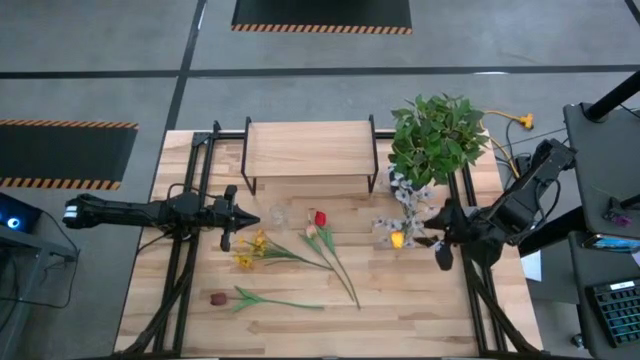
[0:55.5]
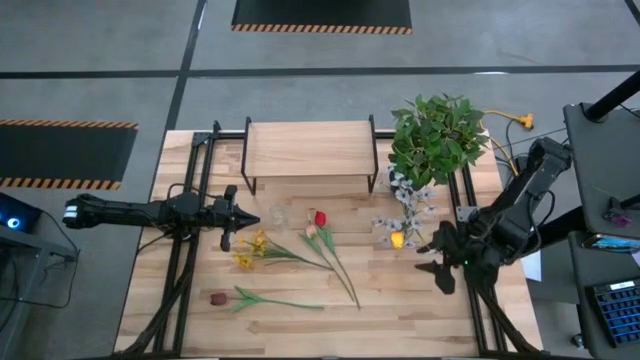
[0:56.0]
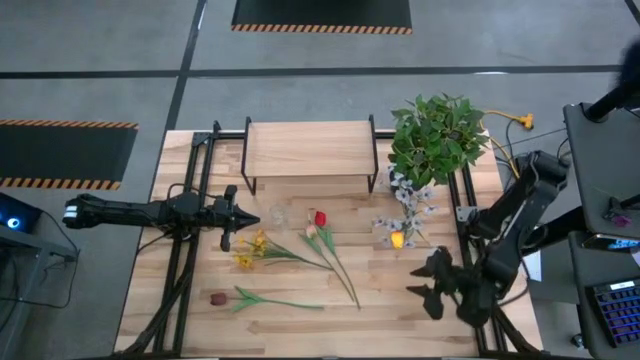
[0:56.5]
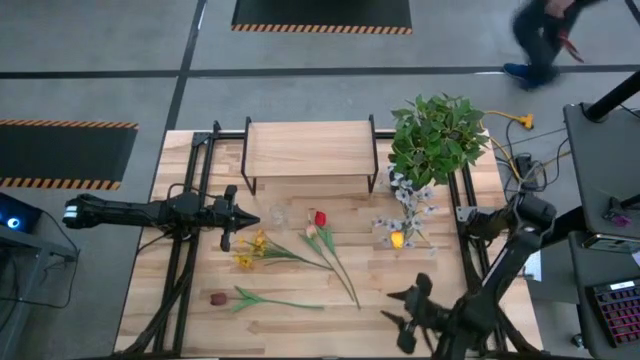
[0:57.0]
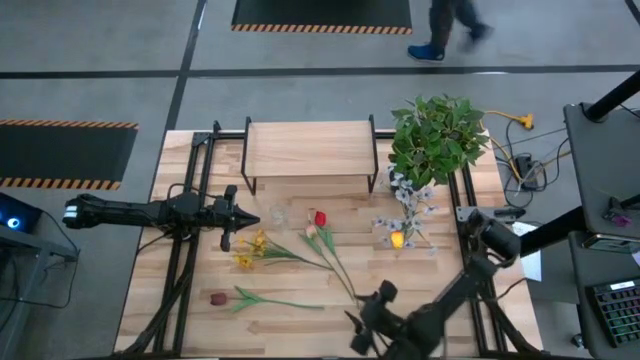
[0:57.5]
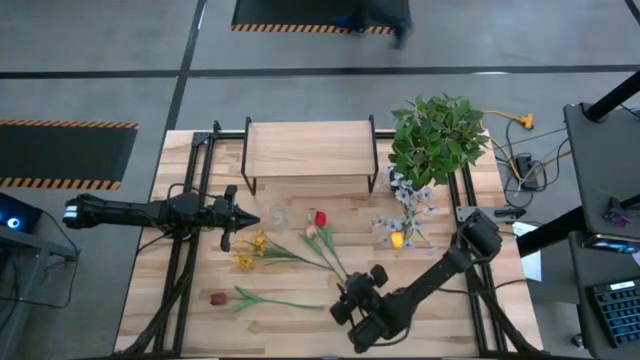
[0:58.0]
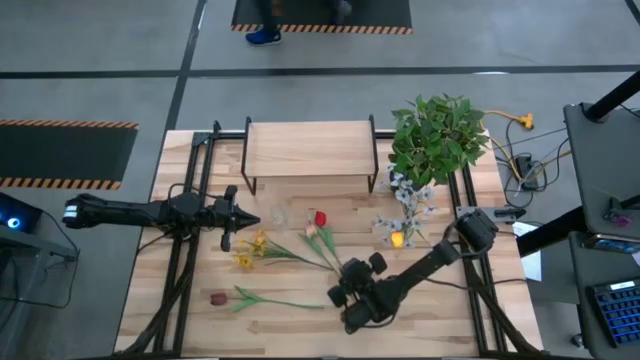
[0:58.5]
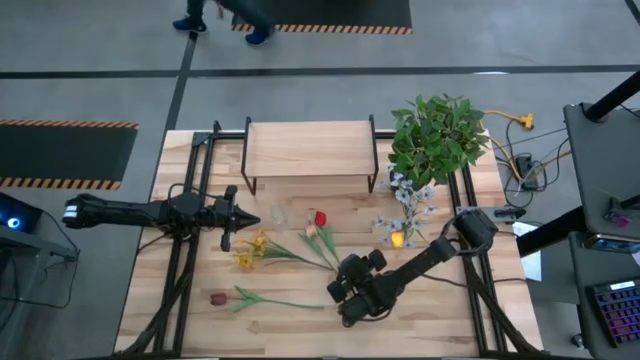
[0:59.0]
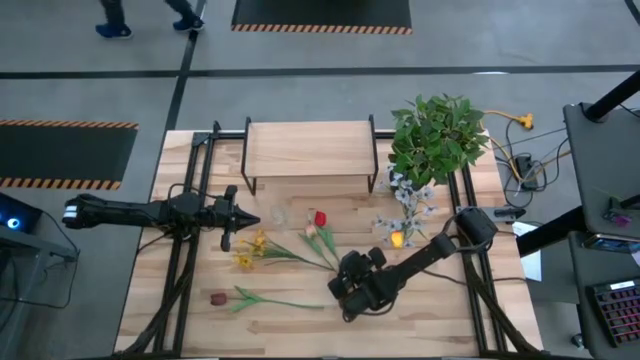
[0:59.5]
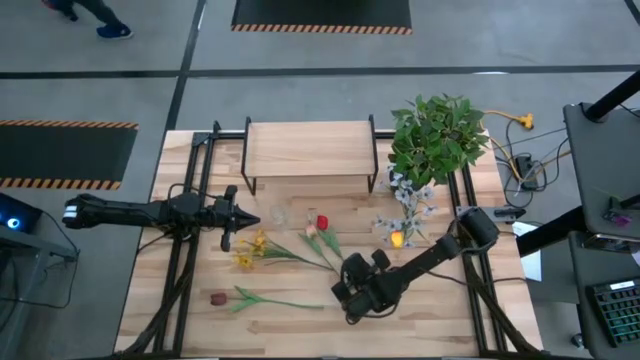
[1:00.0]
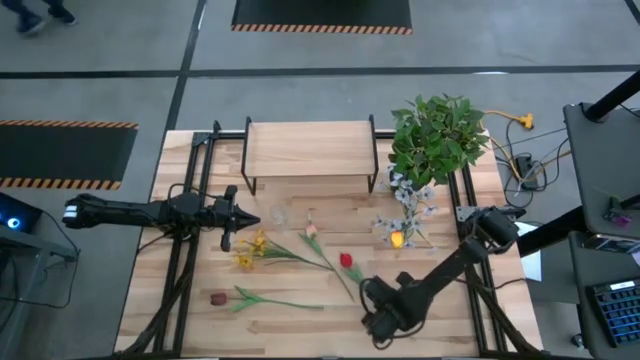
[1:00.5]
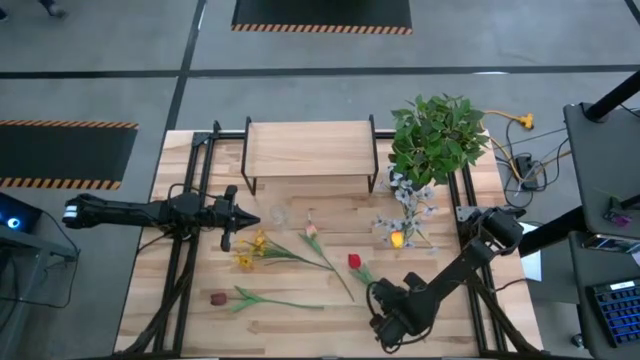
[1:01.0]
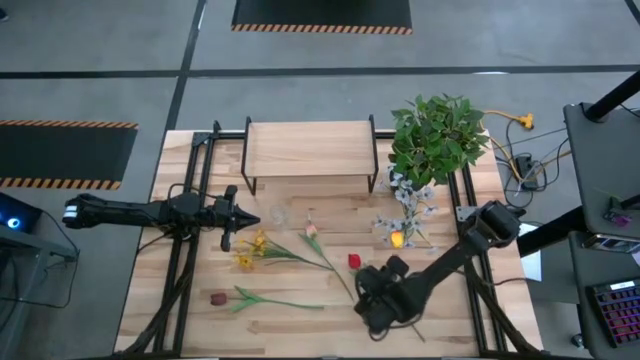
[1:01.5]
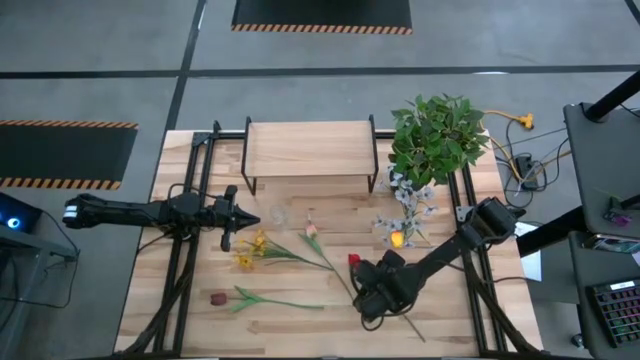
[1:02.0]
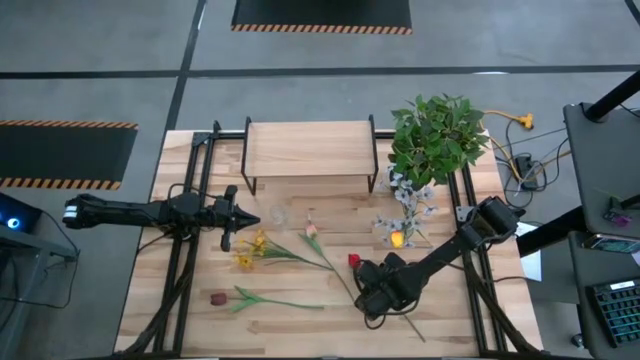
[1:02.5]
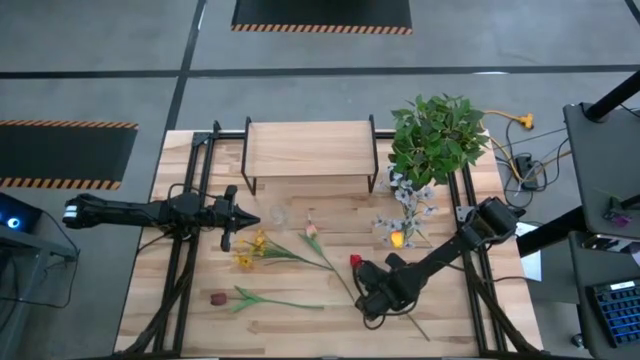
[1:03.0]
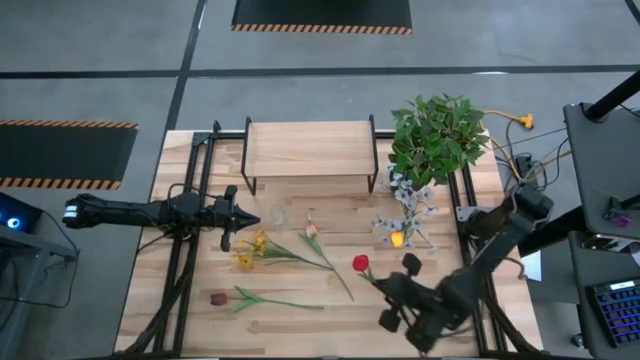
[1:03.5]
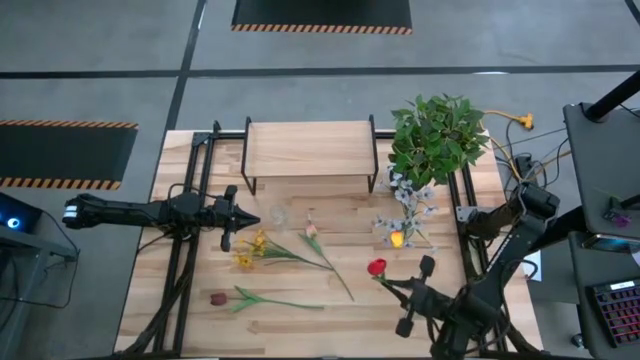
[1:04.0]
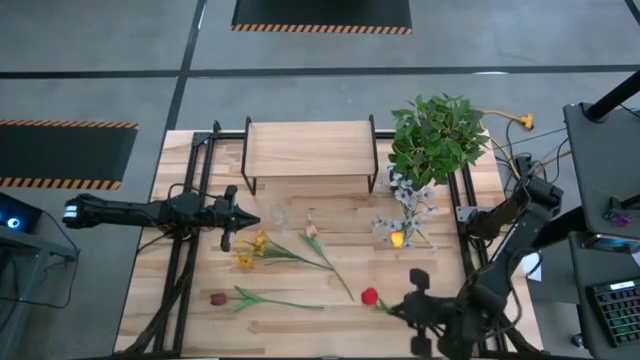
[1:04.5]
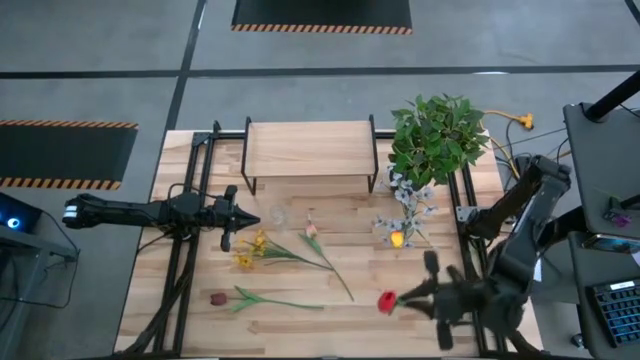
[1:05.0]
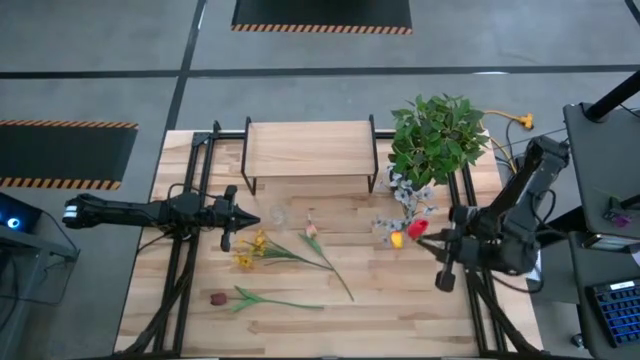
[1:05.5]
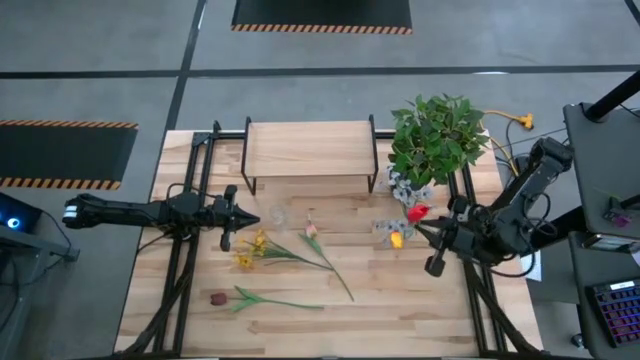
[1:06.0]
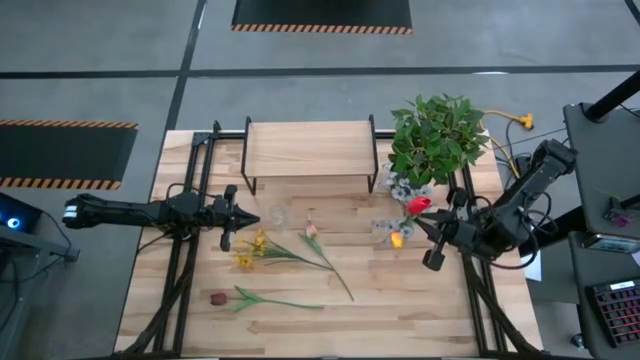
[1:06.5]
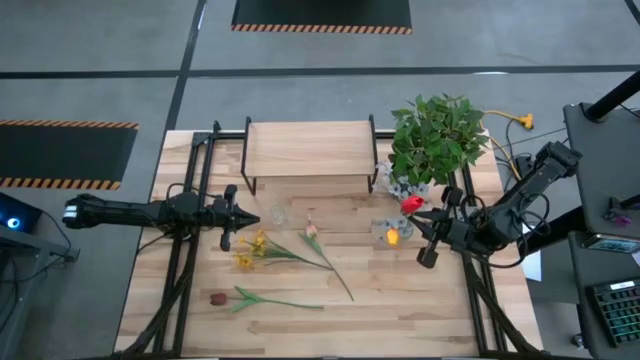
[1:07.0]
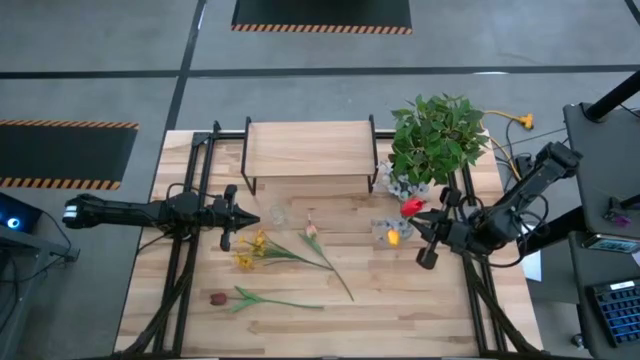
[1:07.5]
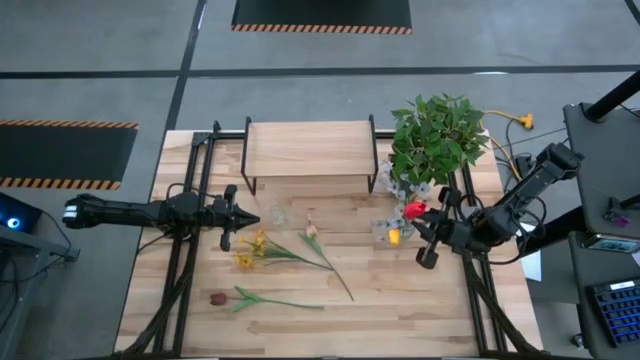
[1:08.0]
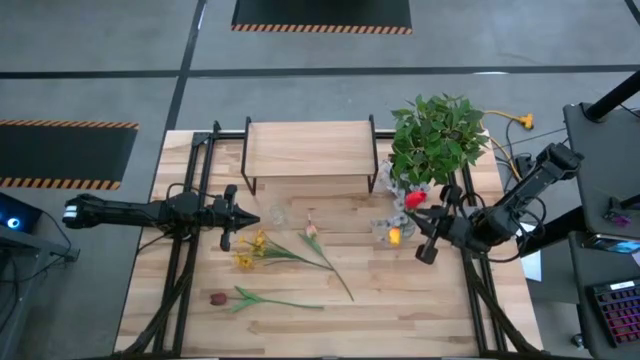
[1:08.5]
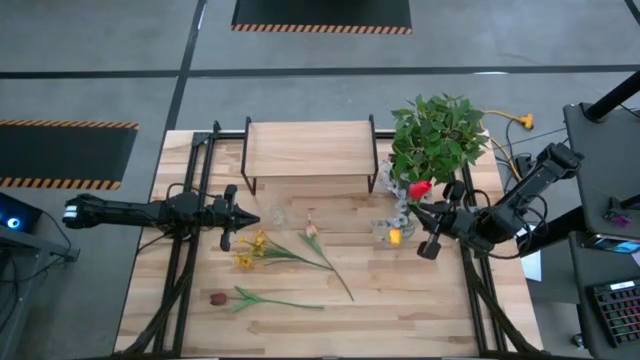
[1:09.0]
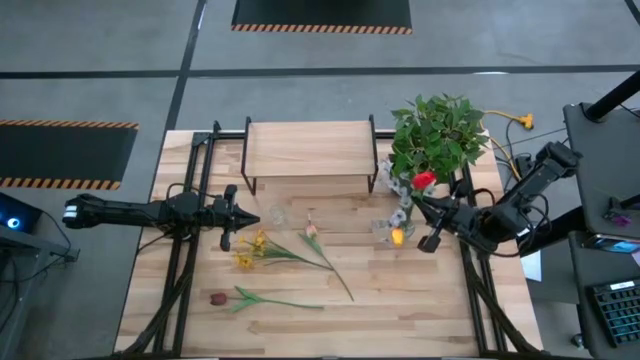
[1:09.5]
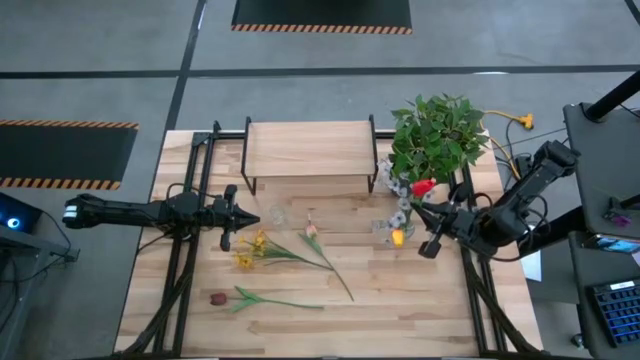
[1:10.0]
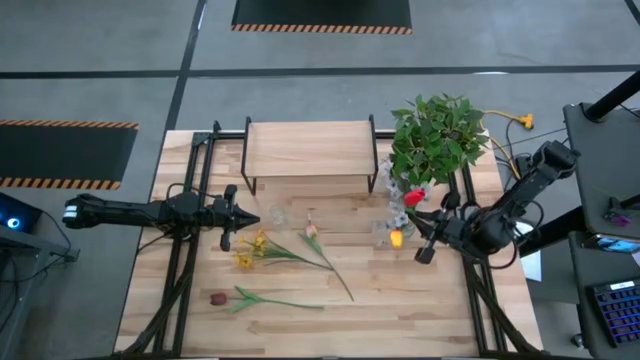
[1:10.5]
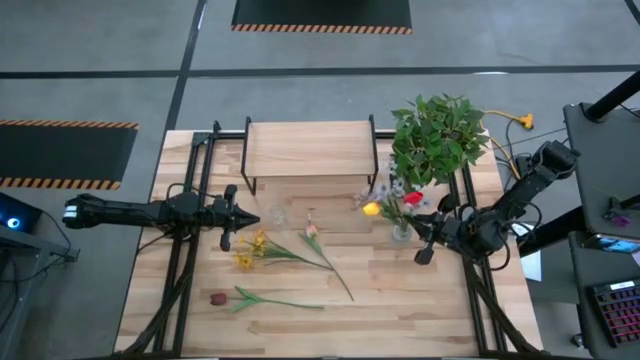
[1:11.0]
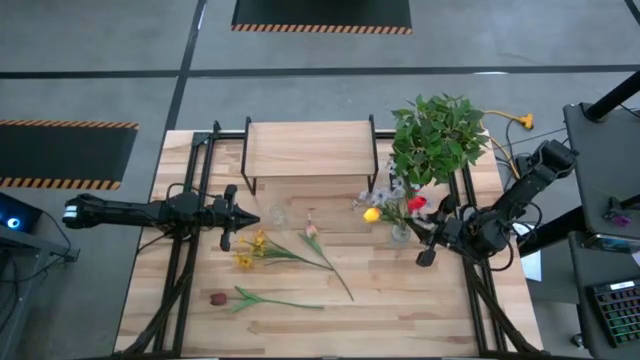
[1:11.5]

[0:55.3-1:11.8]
Task: Pick and place flowers into a vace then onto a shelf
Put the red tulip into the right transparent vase

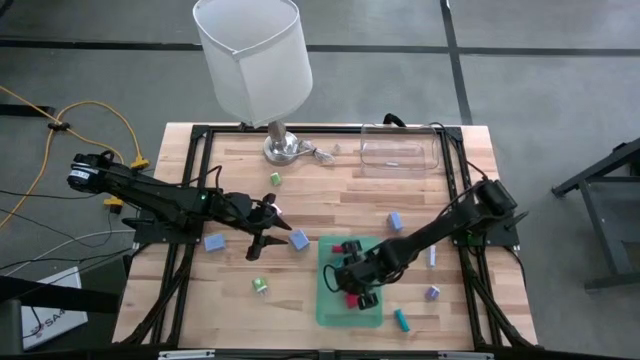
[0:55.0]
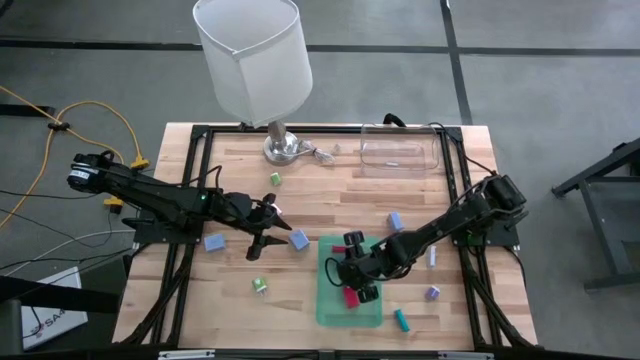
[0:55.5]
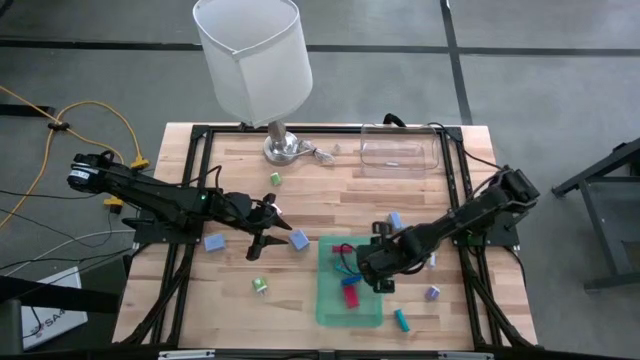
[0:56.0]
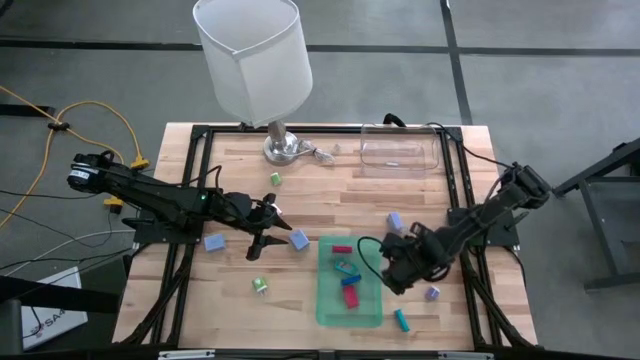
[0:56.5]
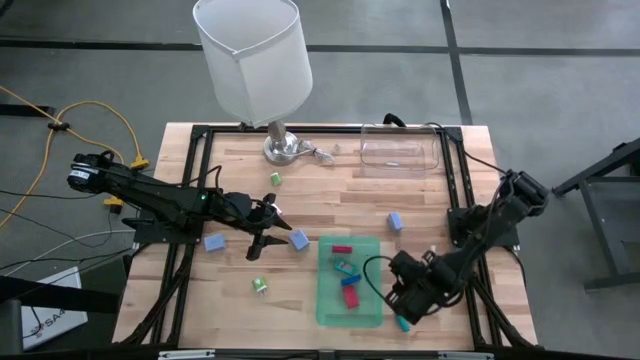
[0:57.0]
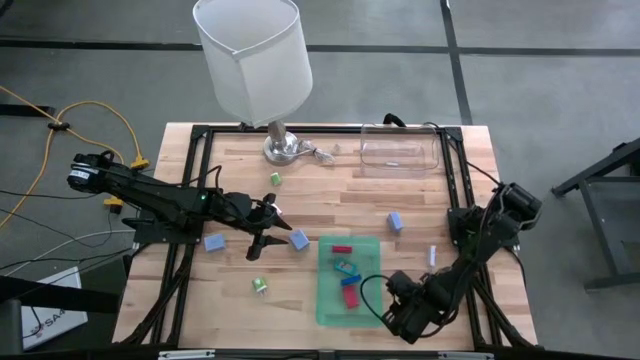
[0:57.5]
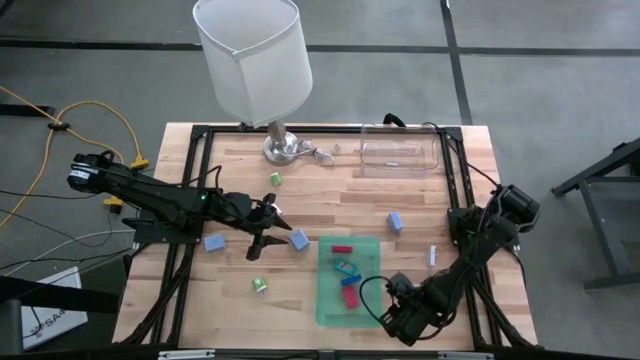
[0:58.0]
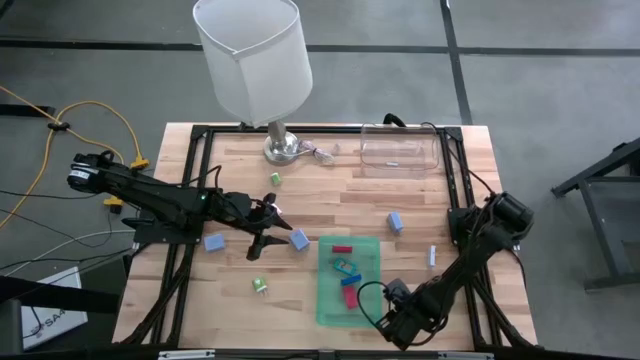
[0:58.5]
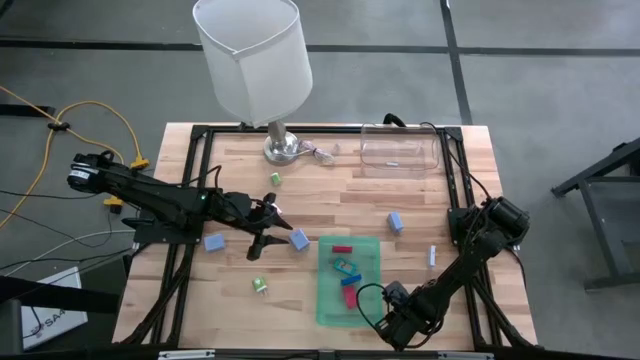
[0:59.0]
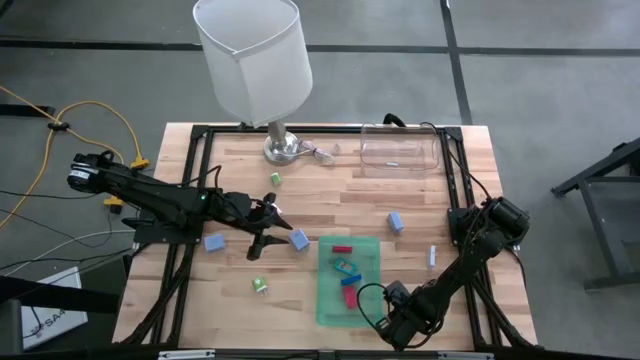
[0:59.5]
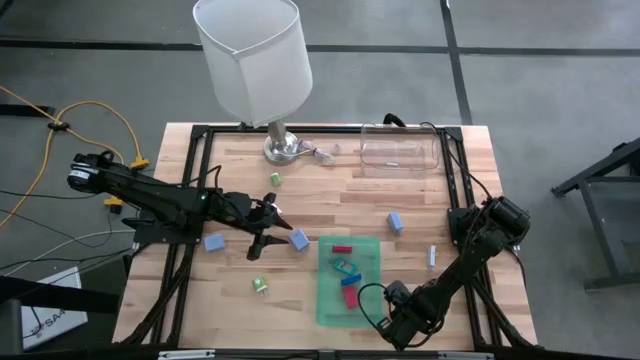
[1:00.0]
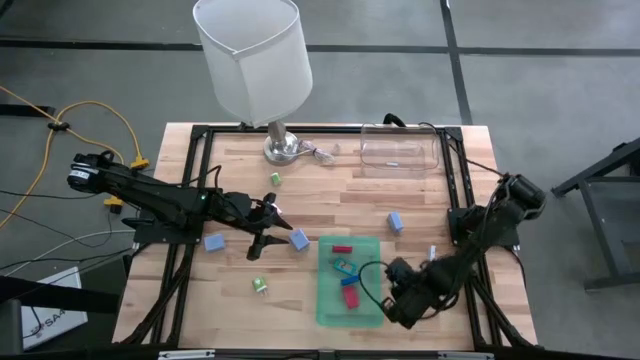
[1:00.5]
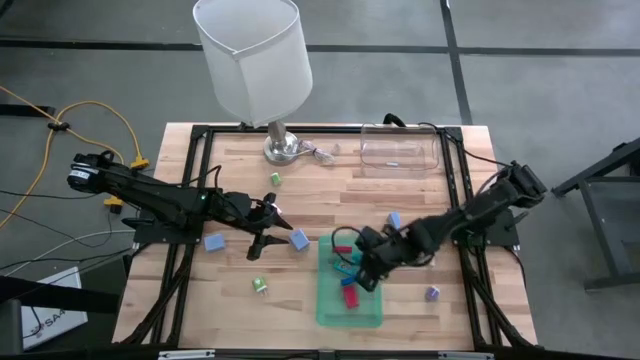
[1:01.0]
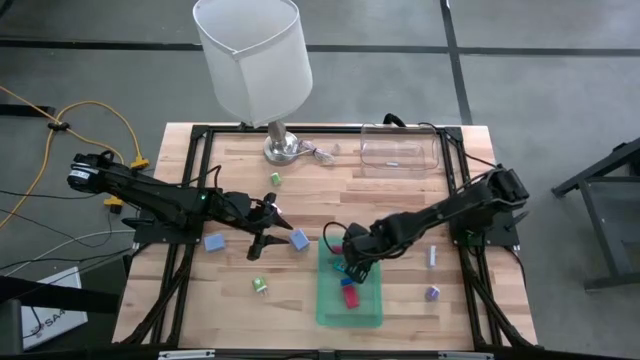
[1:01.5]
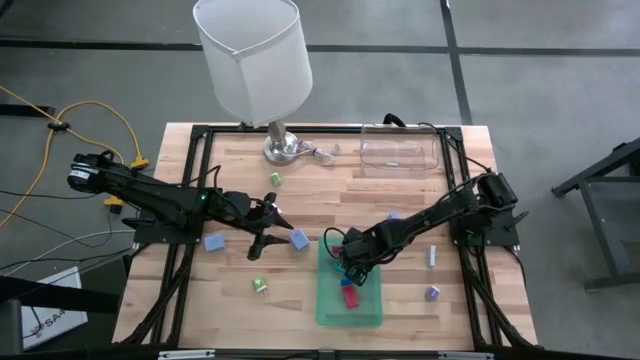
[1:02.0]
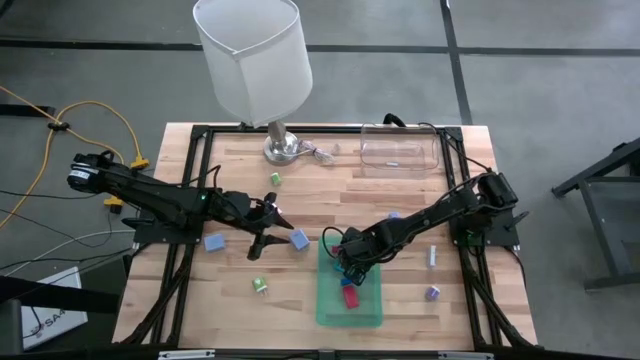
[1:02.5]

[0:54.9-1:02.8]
Task: Pick & Place Office items
Put the light blue digital clock into the green bin
